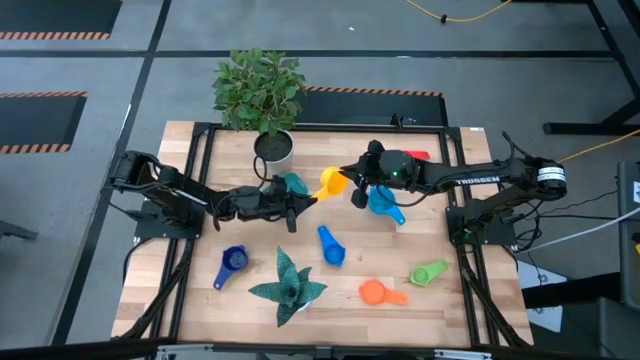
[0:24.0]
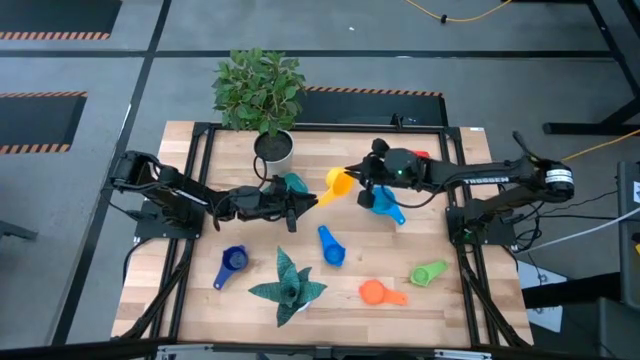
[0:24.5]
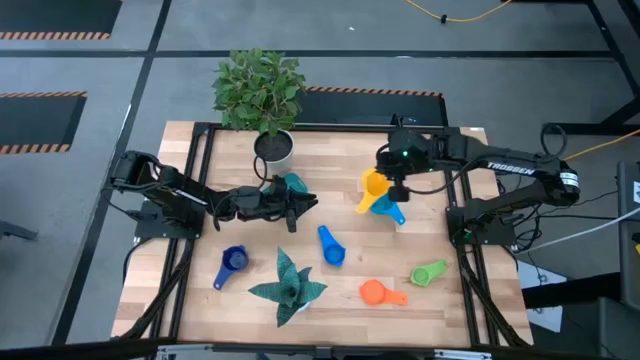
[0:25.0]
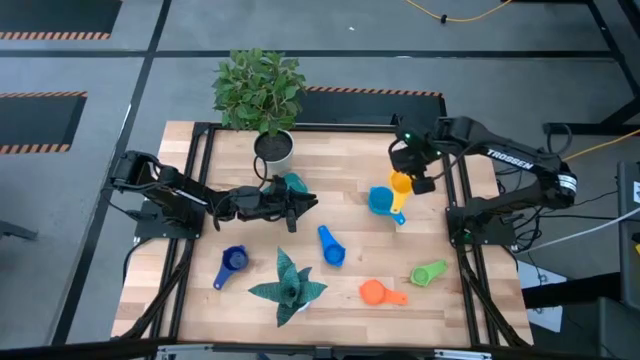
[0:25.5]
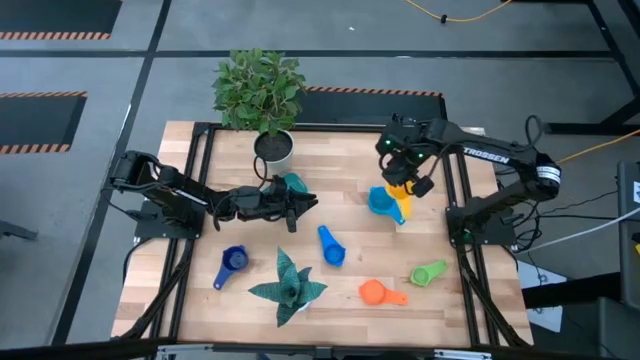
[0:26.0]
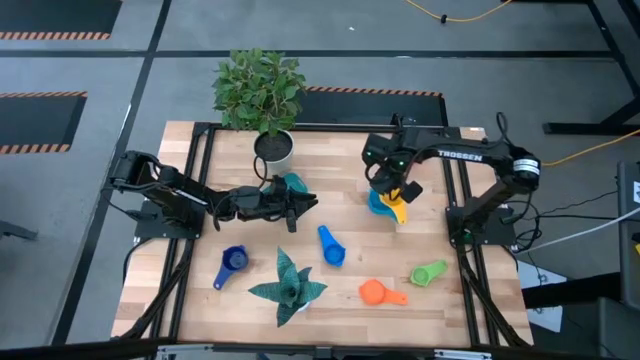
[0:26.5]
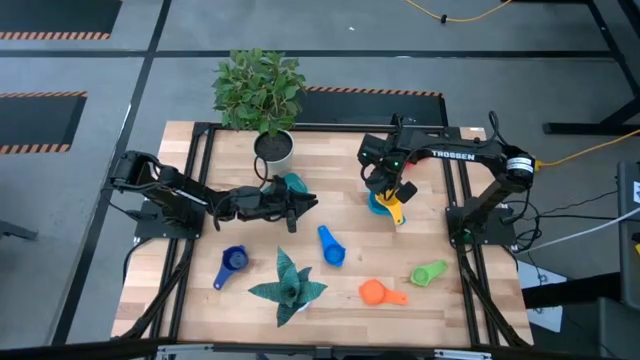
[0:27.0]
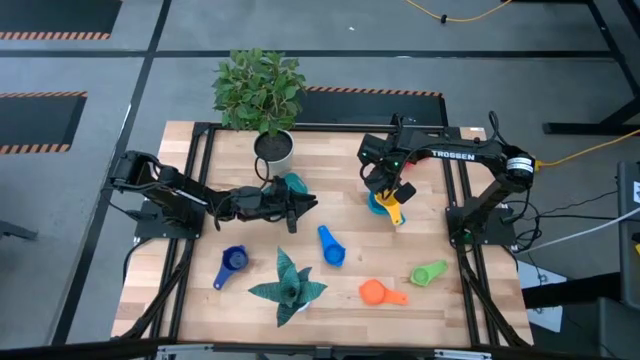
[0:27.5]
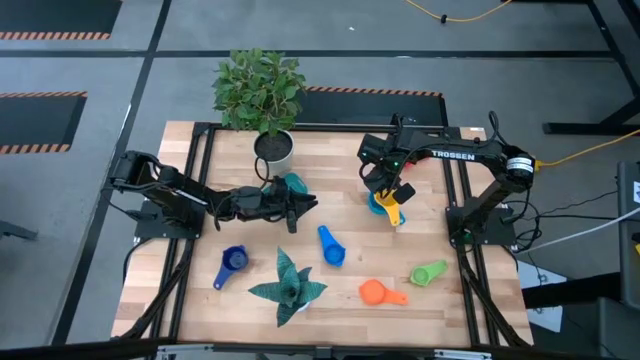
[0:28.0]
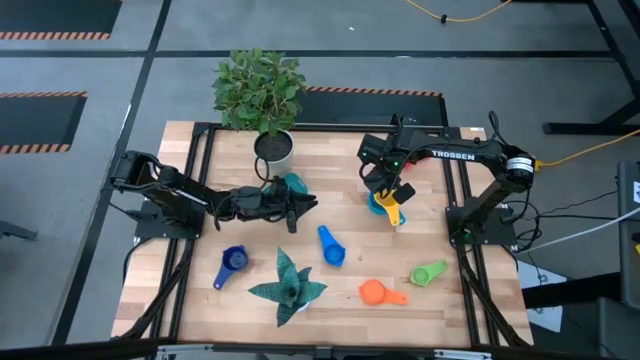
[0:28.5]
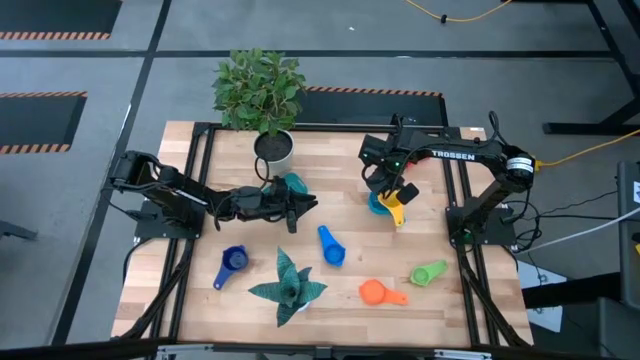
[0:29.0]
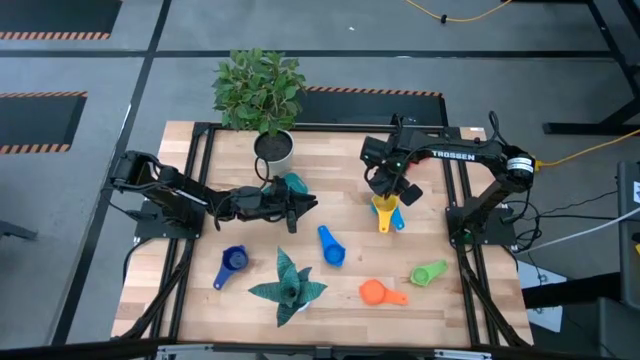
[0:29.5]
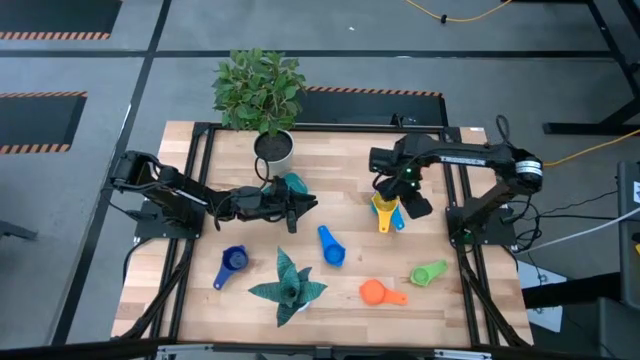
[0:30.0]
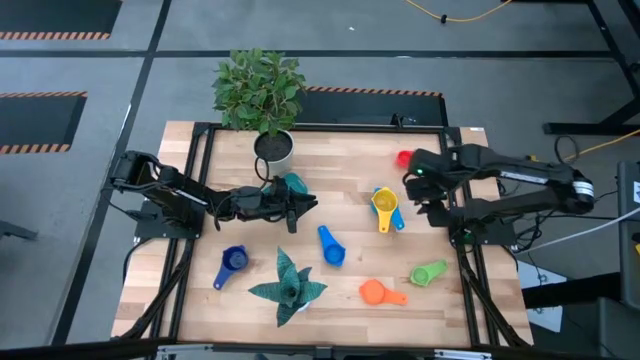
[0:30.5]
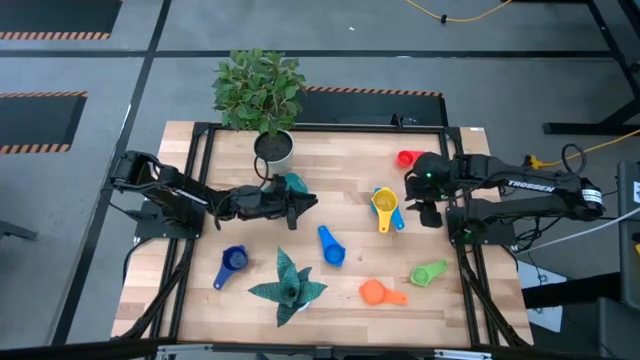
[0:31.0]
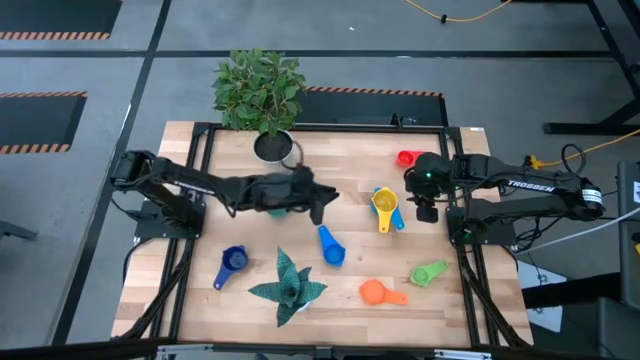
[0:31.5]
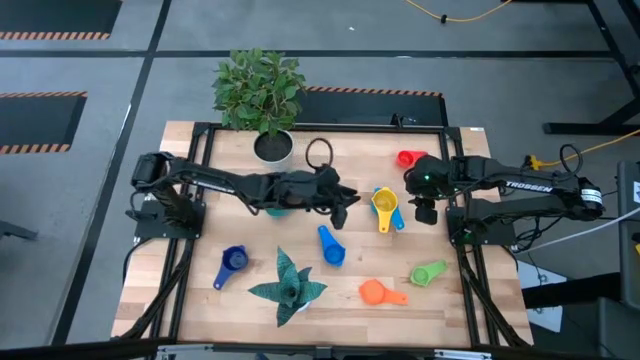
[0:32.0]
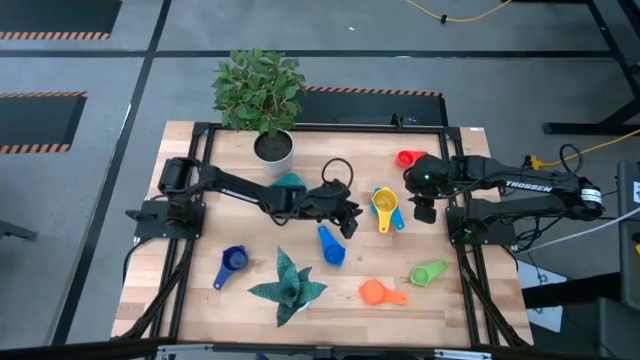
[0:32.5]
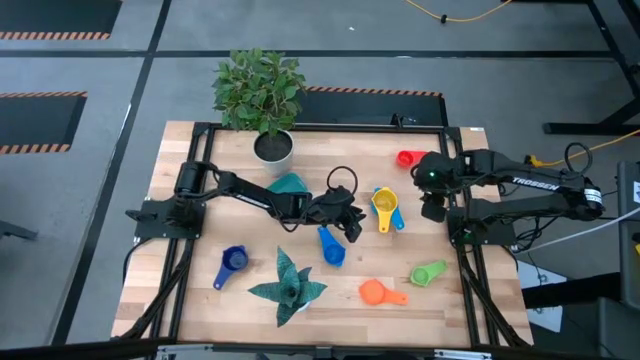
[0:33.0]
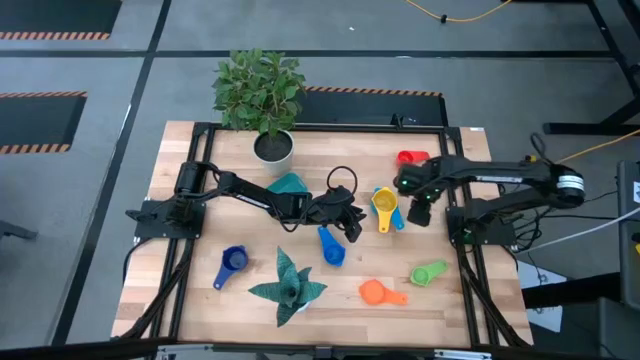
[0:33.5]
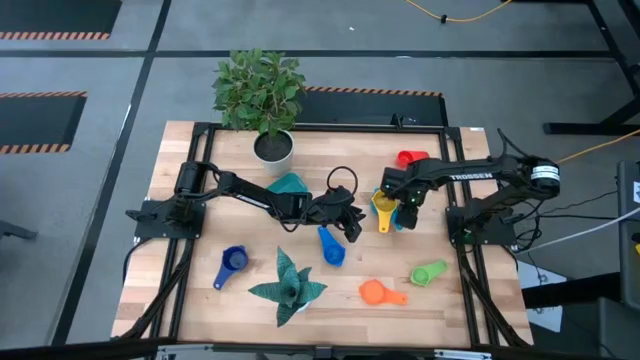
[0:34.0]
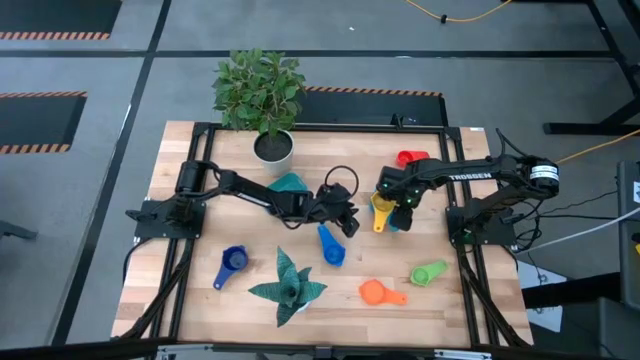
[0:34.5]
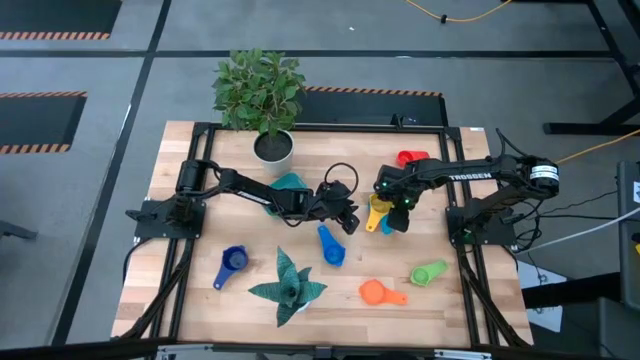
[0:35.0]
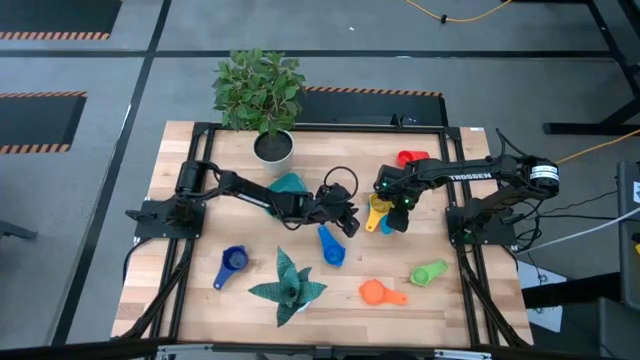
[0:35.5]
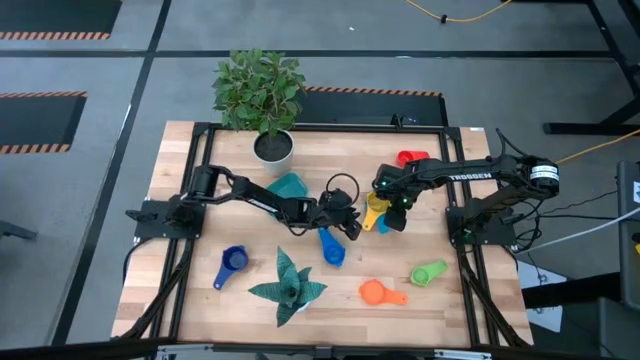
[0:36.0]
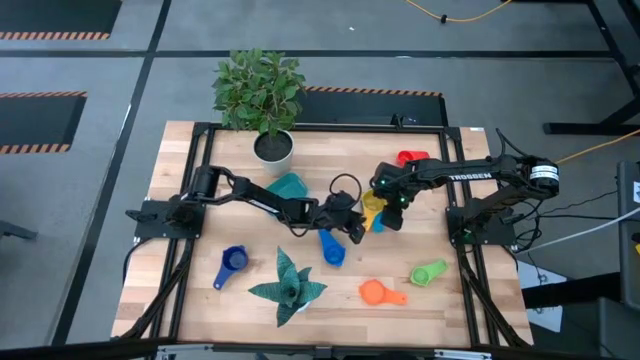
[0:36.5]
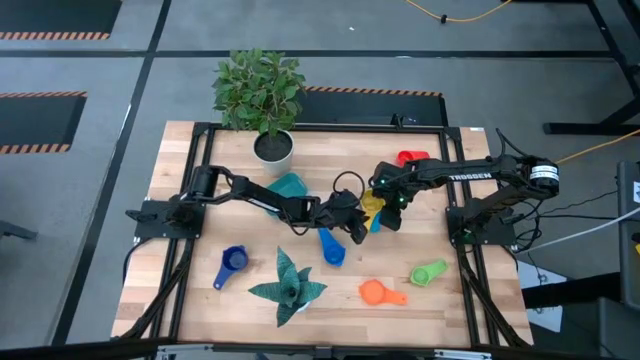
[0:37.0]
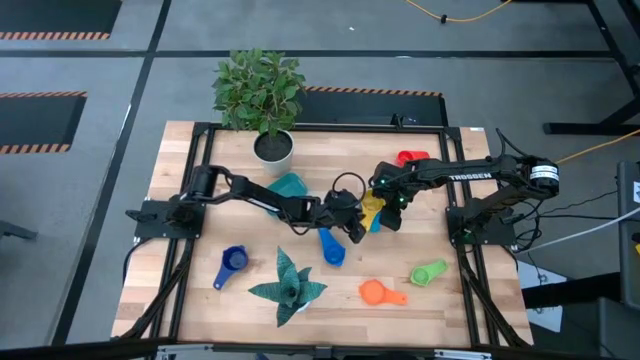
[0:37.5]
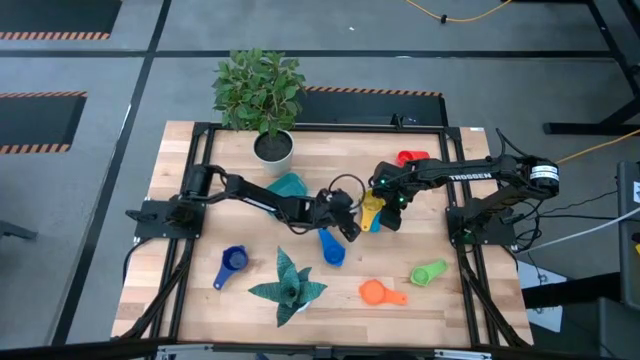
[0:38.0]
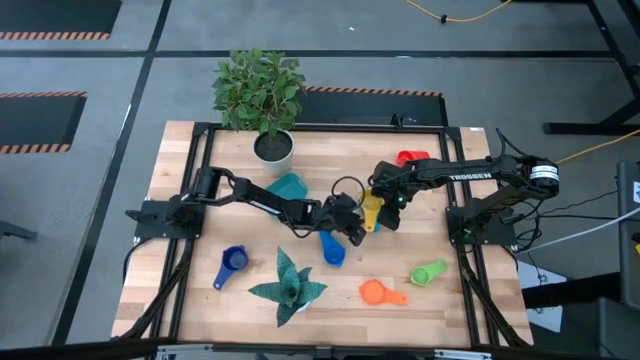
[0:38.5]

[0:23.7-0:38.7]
Task: Nest measuring cups in basket
Stack the yellow measuring cup on top of the light blue measuring cup

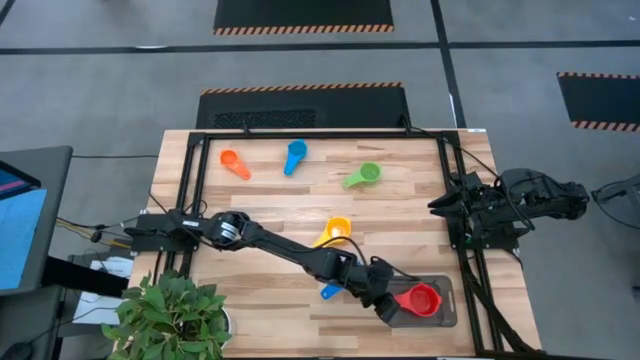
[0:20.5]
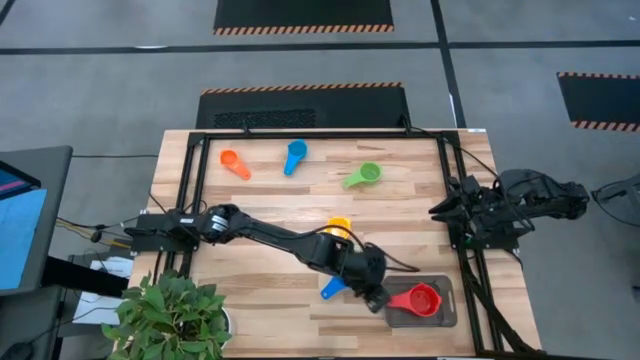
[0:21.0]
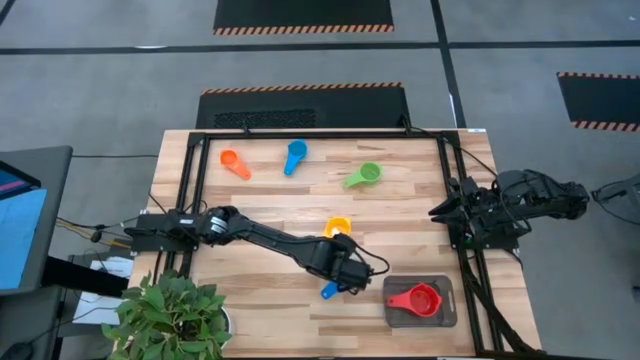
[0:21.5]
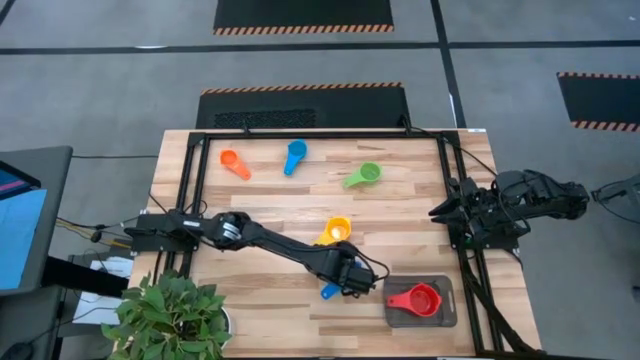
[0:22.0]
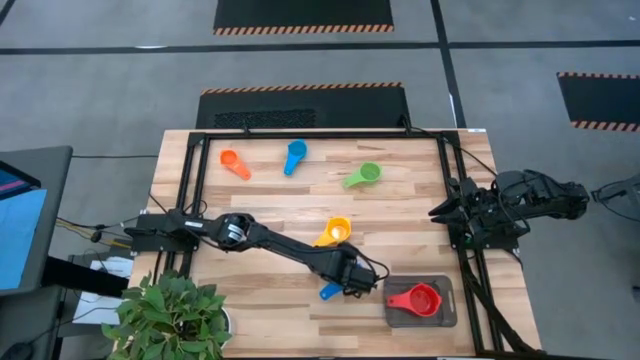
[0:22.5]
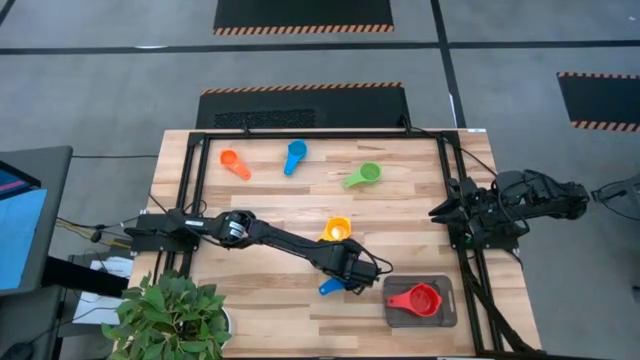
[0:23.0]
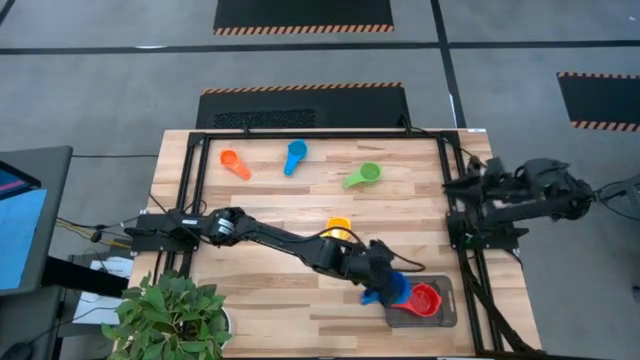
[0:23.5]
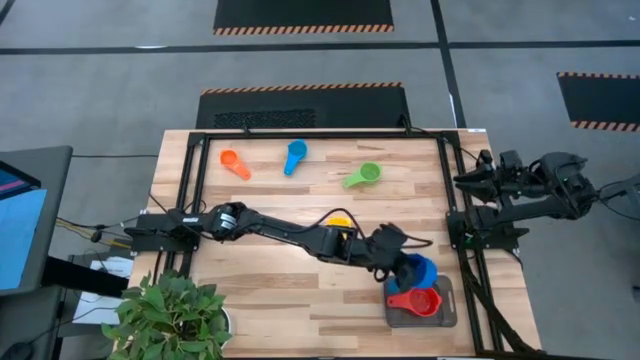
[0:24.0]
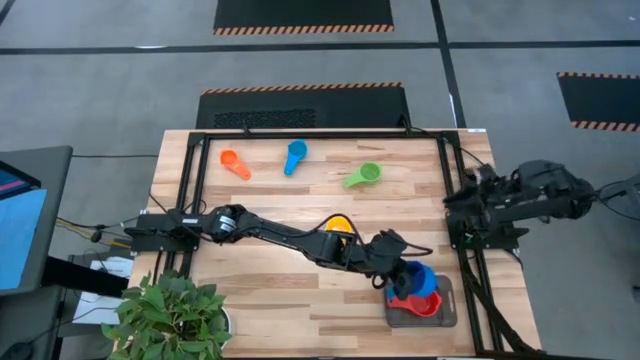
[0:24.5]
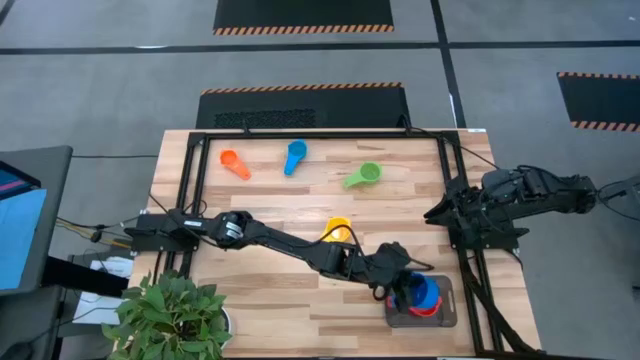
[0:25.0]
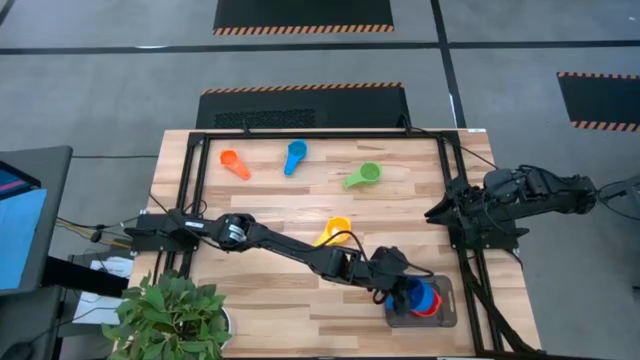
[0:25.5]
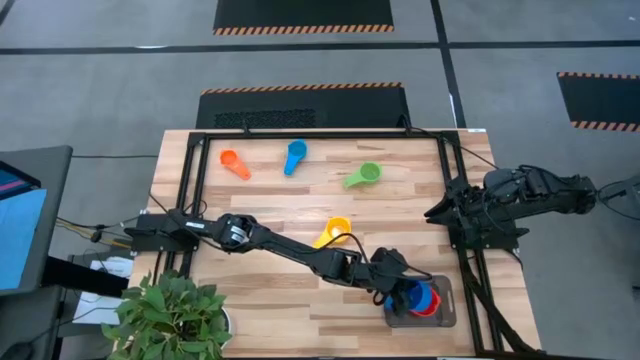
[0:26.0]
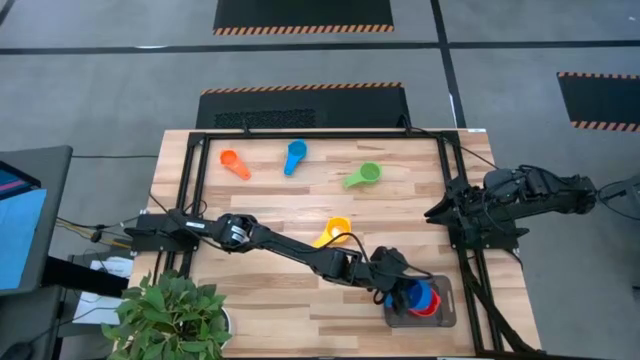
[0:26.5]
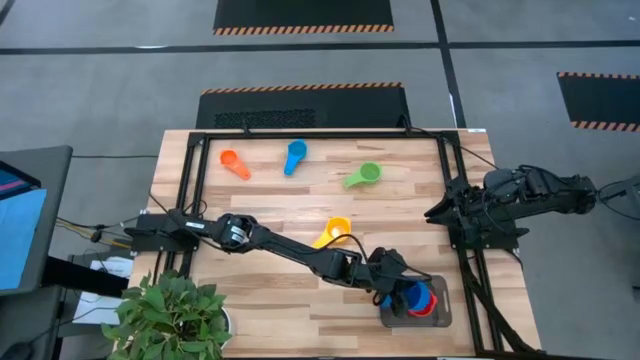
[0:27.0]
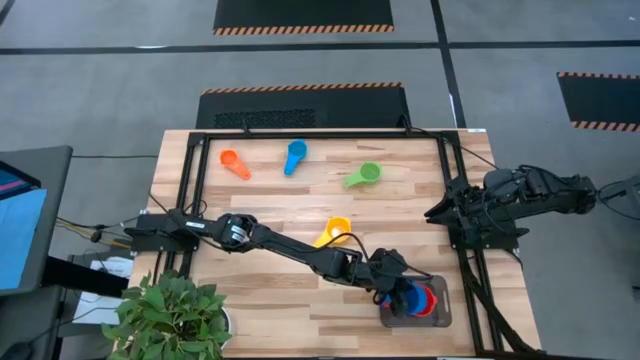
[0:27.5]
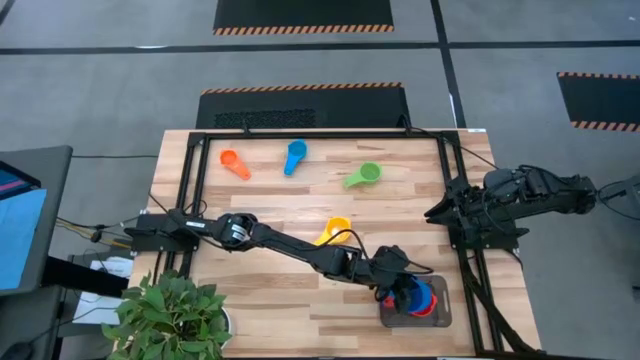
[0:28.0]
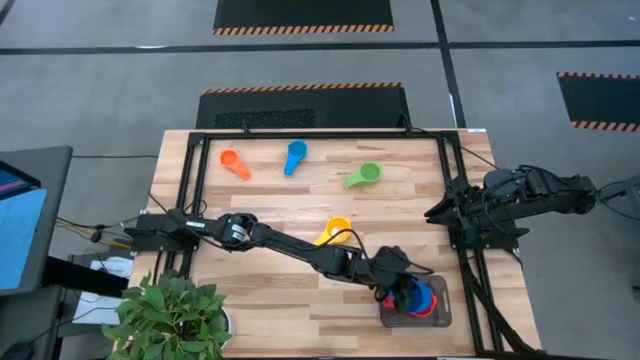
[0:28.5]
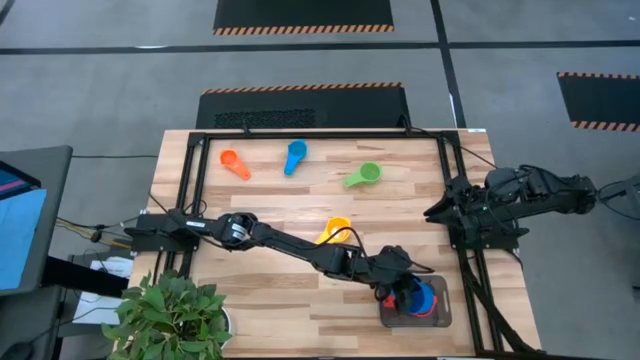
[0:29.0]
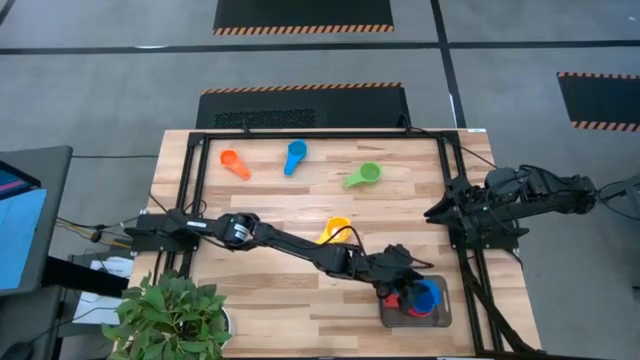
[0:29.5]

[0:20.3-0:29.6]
Task: Nest measuring cups in basket
Stack the blue measuring cup on top of the red measuring cup in the black bin
